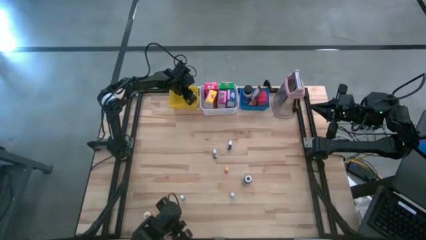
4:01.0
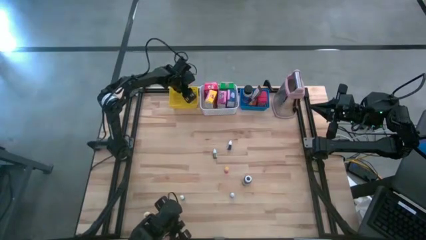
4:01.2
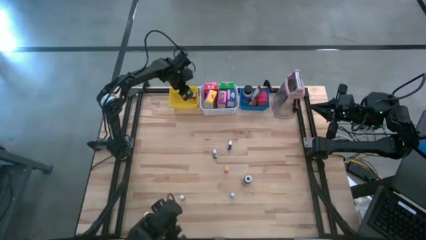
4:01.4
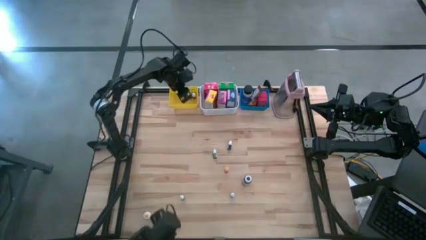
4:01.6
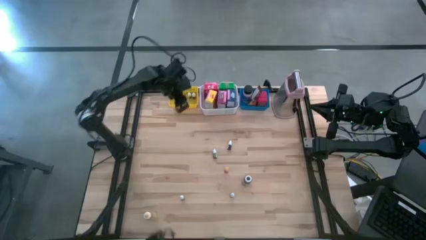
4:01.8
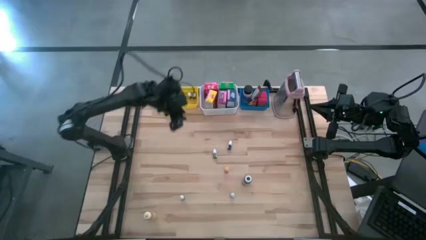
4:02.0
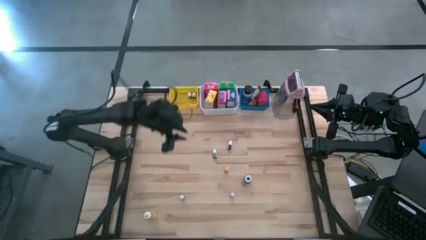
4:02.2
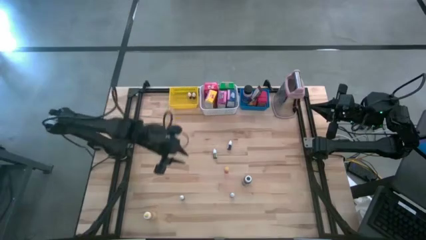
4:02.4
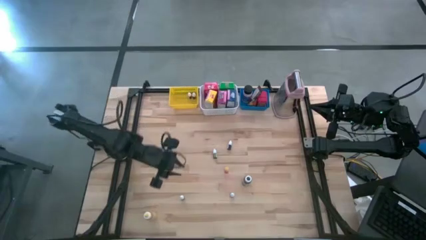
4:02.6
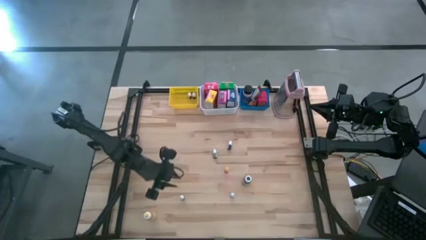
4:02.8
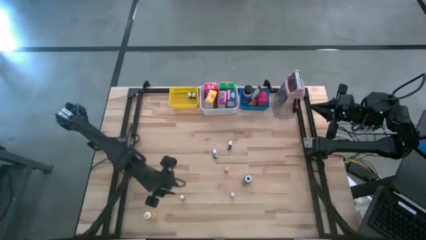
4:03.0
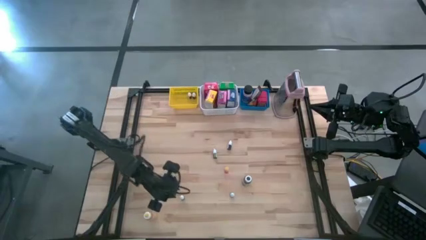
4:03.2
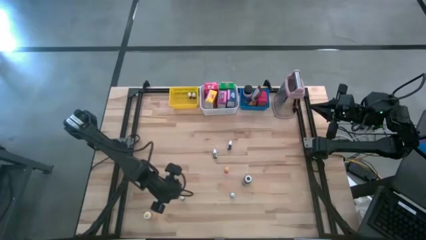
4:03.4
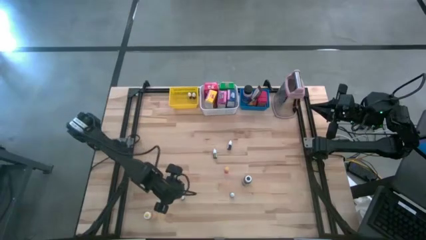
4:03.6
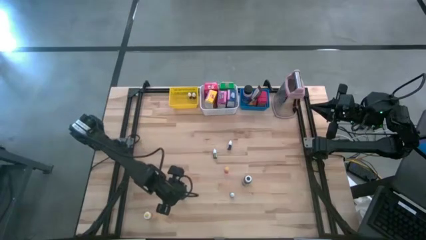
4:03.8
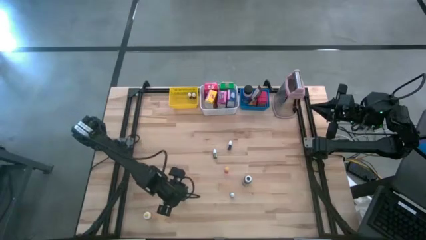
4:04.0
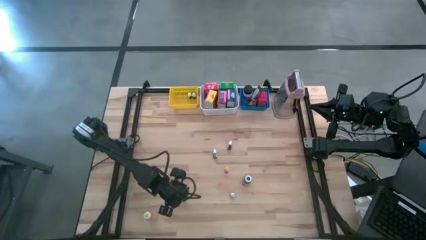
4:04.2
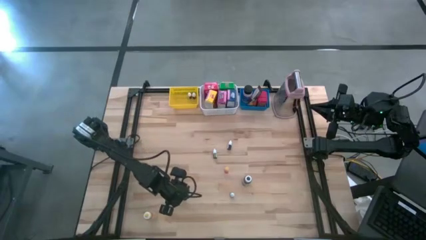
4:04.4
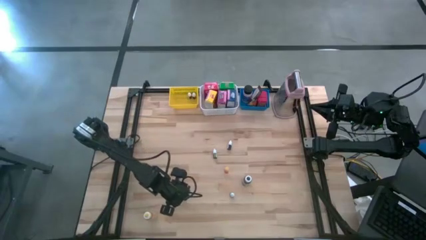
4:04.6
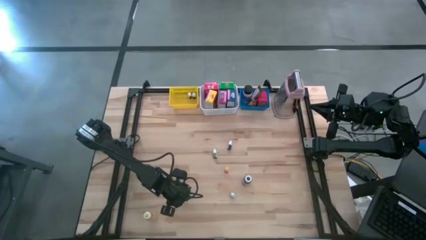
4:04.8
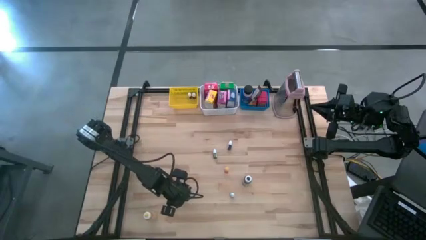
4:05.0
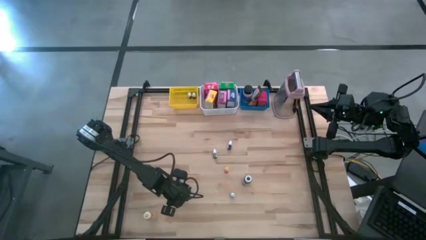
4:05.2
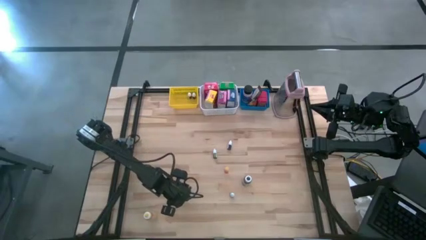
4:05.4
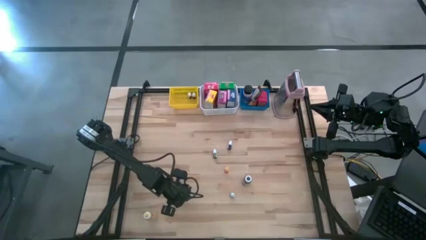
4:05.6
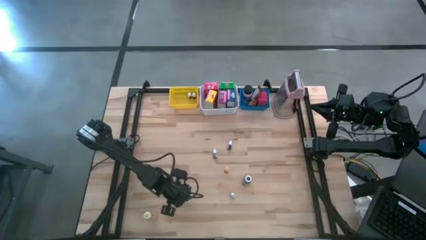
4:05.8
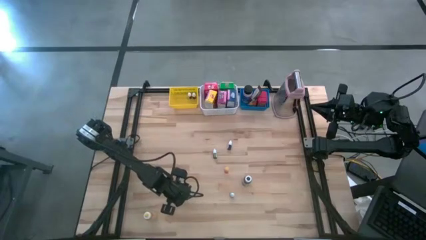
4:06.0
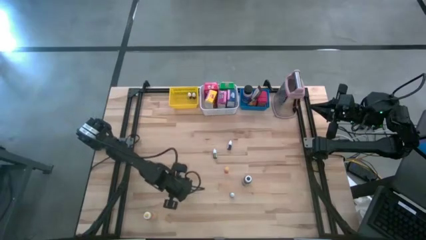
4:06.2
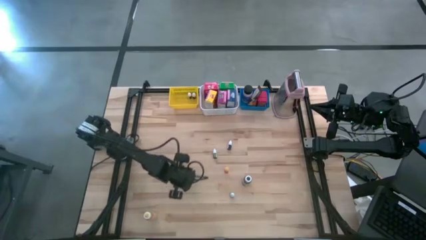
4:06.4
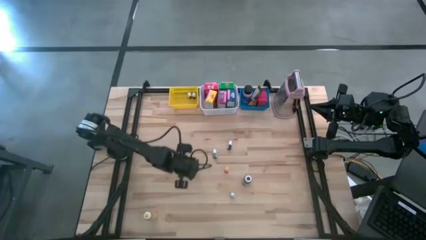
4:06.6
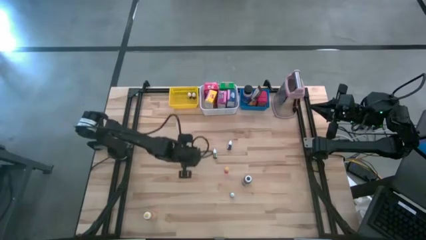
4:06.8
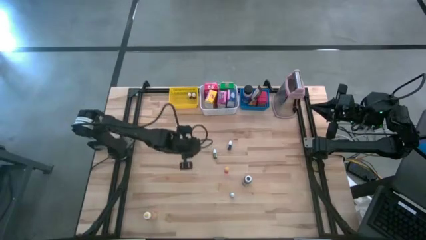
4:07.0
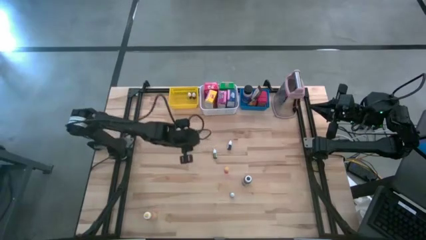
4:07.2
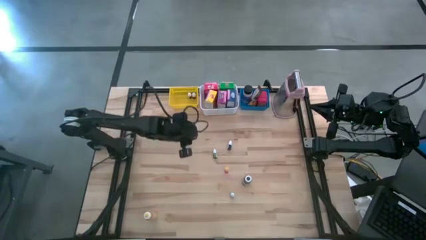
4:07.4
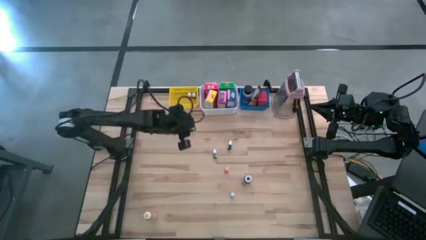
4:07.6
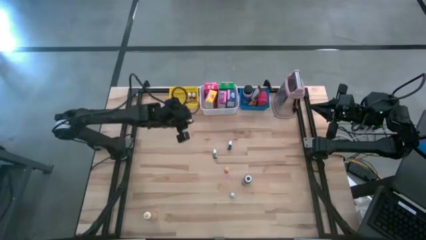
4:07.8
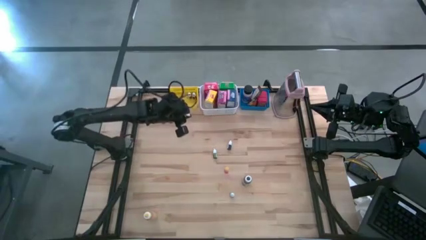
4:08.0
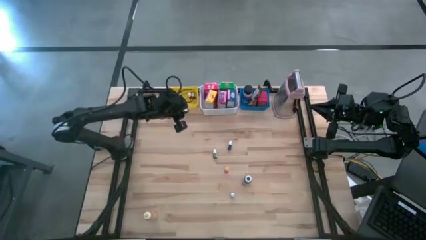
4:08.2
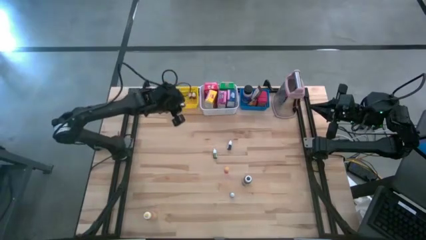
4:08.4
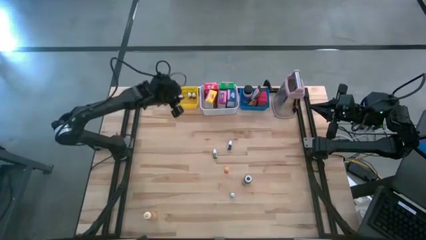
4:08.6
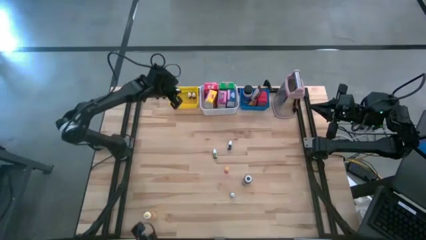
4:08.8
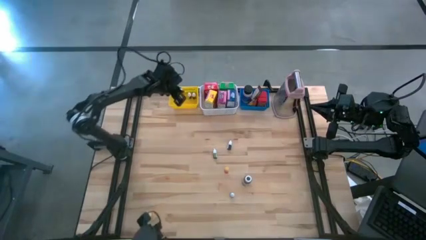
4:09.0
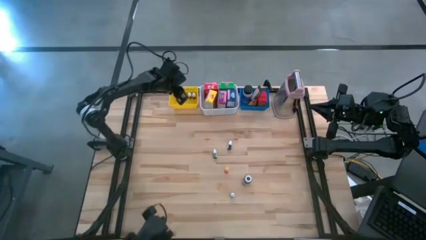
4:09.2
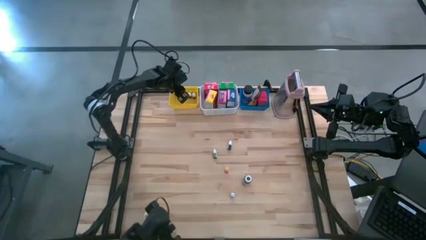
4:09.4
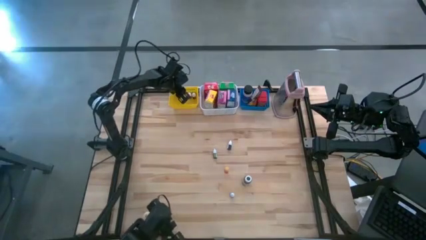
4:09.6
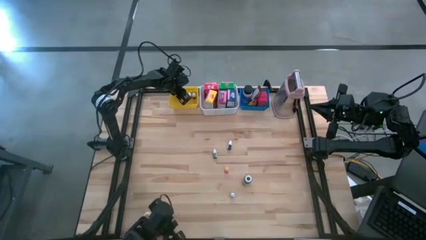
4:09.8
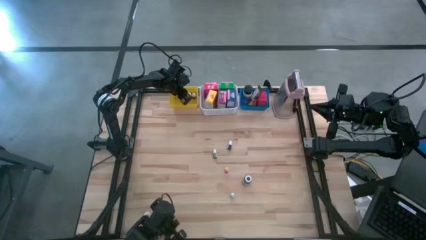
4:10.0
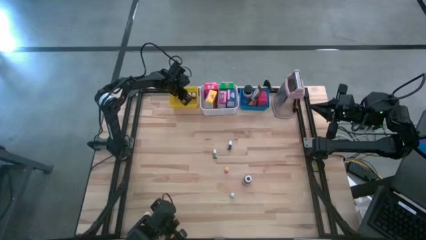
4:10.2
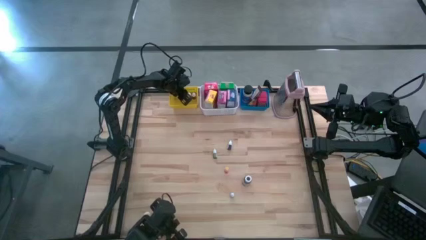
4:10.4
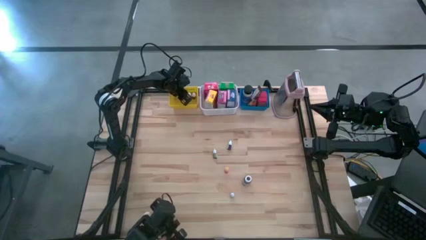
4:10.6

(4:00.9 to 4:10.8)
Task: Pick & Place Kitchen Items
Put the black food coloring bottle into the yellow basket

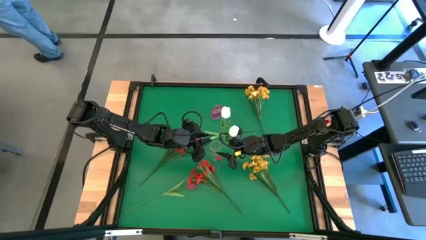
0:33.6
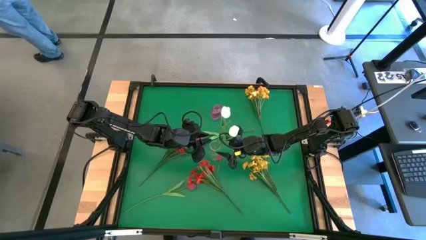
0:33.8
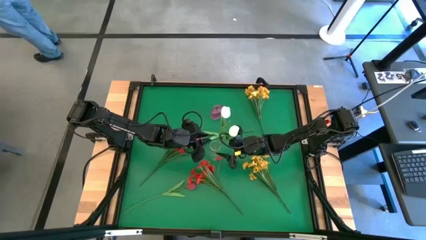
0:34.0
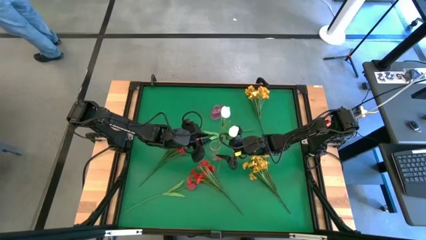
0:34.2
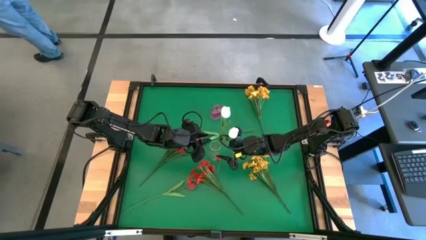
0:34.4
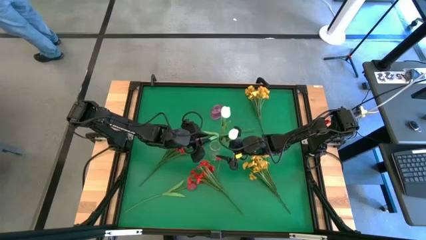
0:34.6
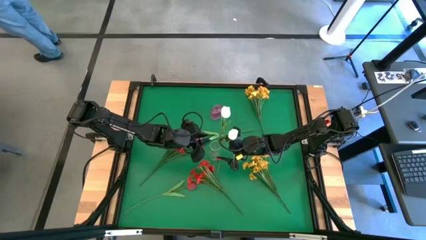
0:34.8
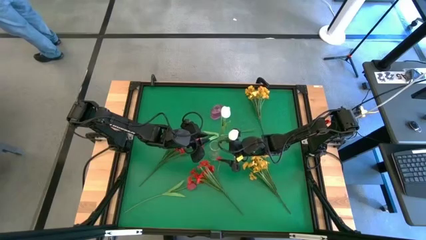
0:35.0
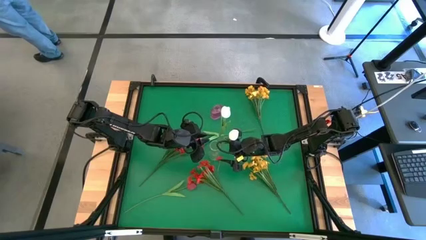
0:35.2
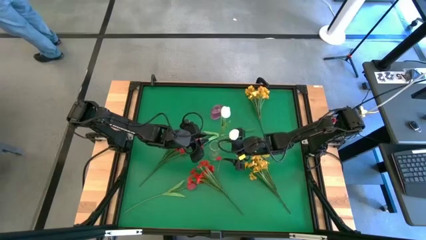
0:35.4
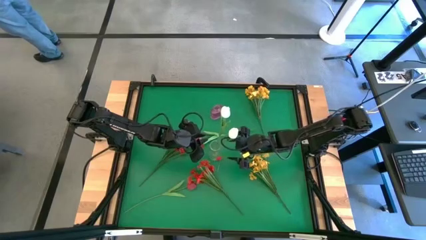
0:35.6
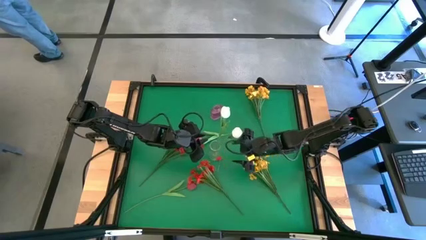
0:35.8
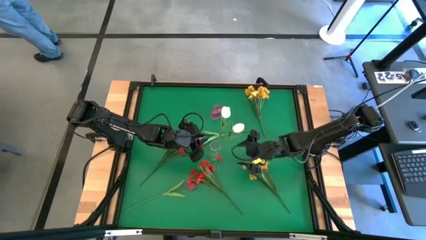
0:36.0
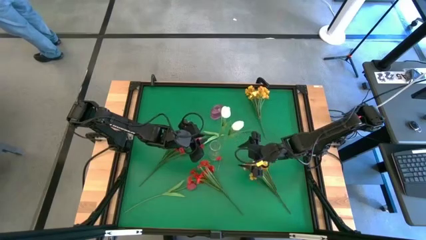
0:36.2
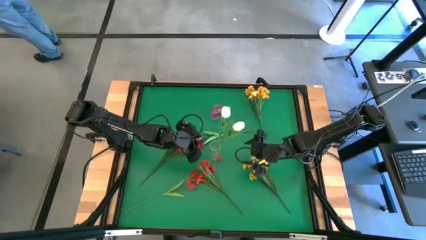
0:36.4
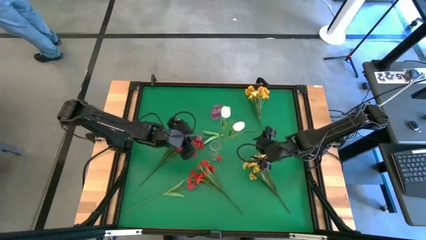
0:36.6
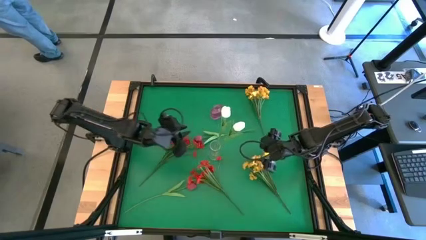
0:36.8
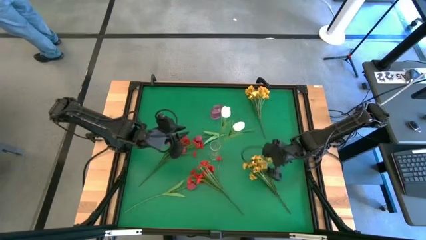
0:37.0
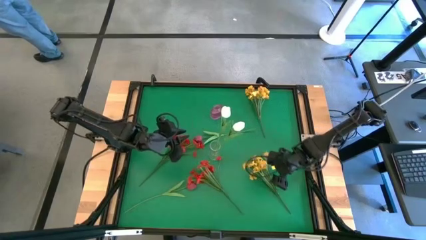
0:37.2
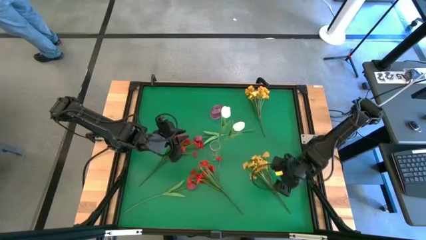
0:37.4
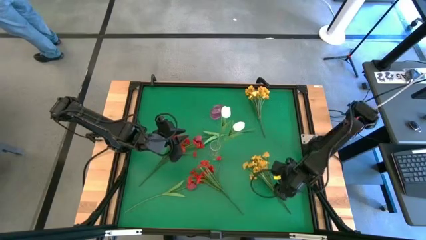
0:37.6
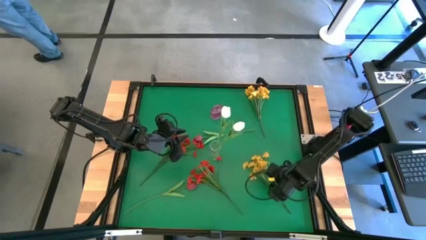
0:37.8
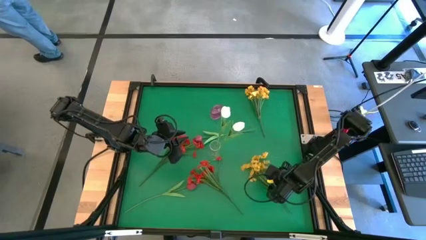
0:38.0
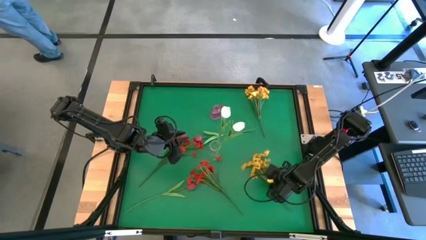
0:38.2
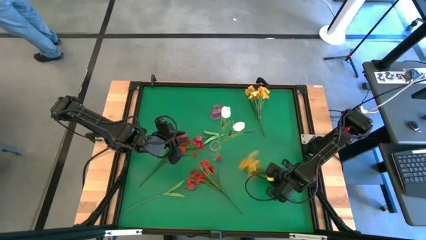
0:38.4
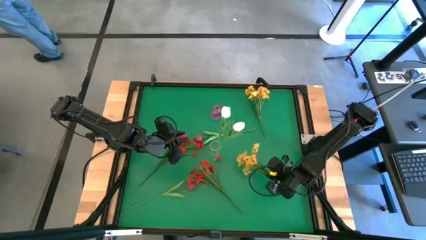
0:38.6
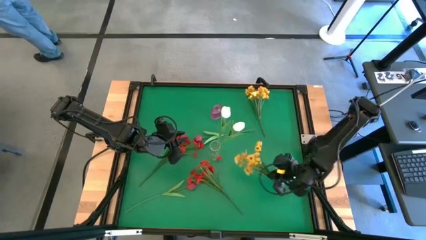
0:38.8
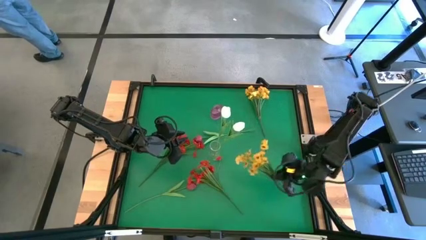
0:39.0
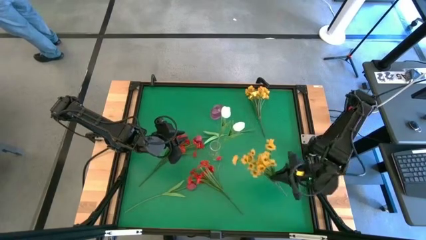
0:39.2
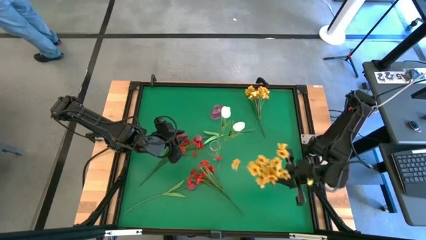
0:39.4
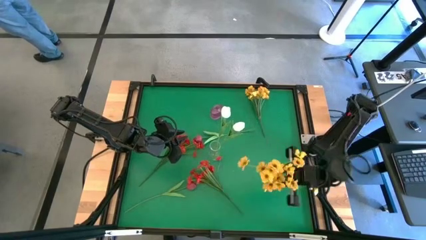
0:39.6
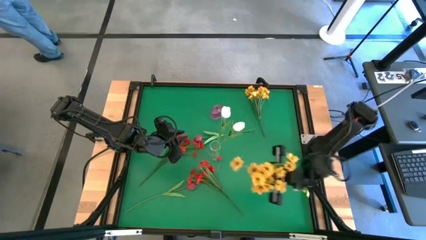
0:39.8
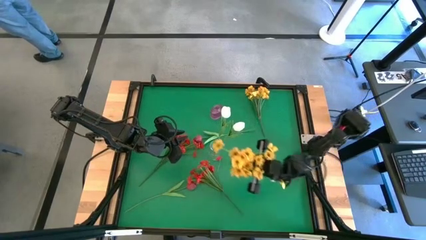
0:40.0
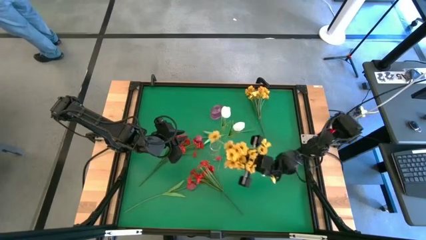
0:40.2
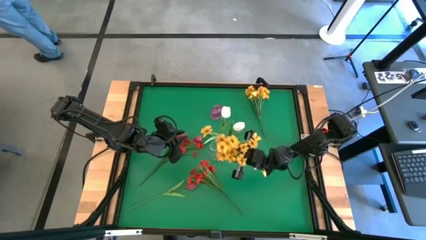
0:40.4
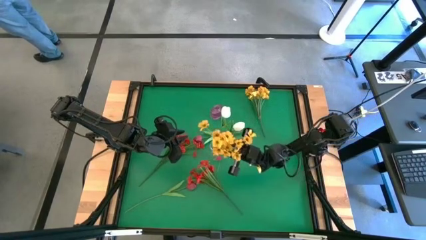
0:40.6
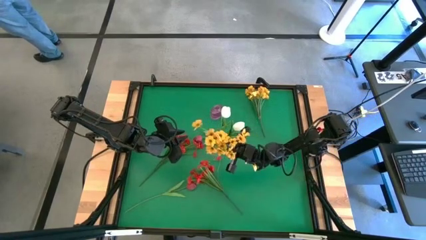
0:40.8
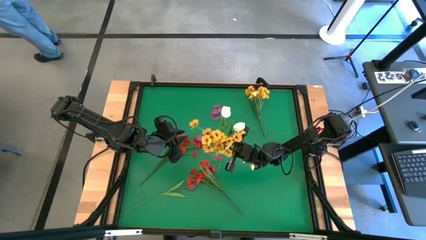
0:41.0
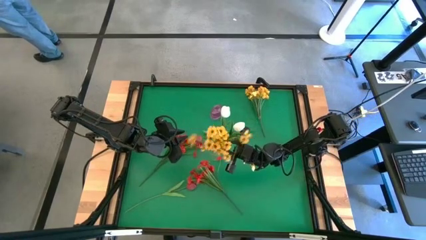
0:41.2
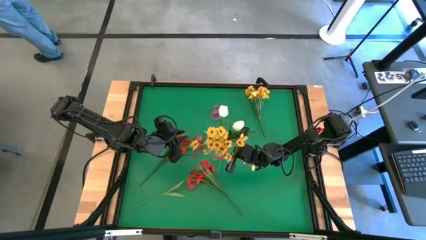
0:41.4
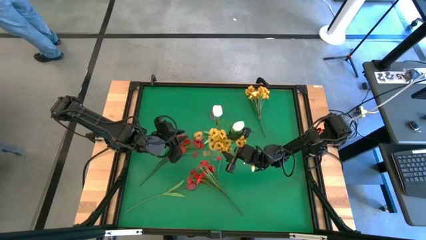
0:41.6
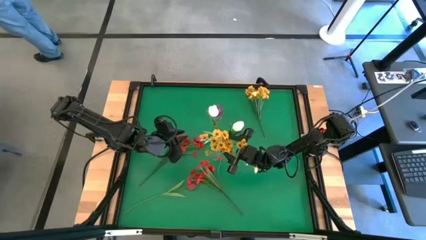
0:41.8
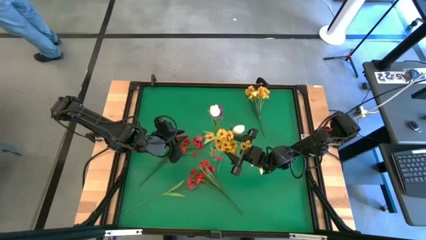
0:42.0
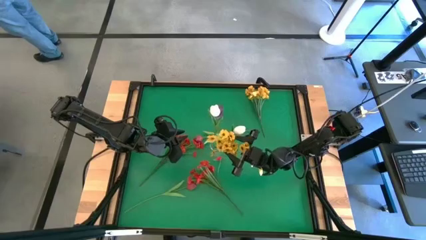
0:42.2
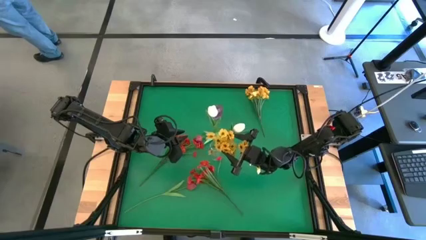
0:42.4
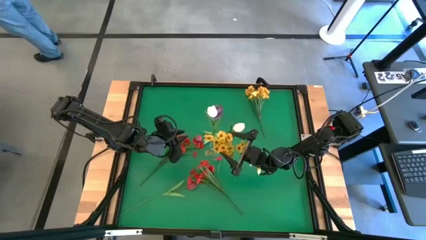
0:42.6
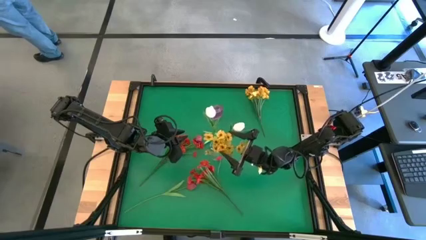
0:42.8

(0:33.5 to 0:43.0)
Task: Sort flowers into vase by color
Put the bottom yellow flowers into the transparent vase
